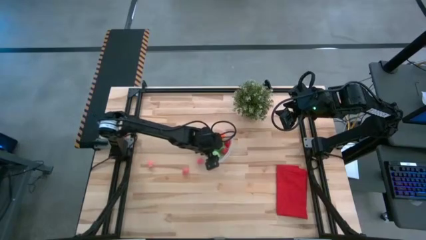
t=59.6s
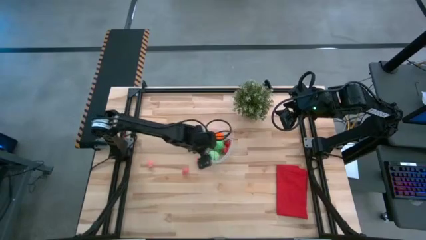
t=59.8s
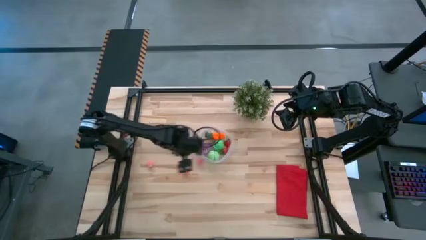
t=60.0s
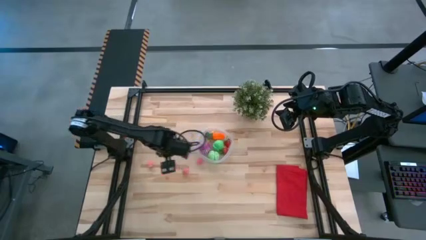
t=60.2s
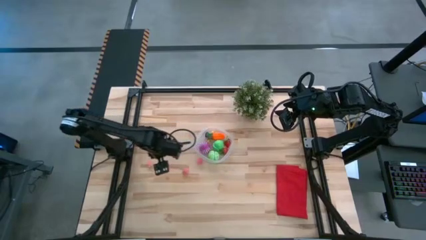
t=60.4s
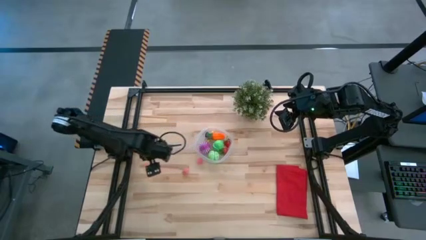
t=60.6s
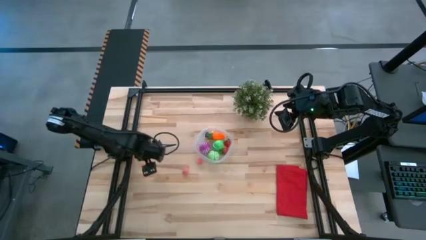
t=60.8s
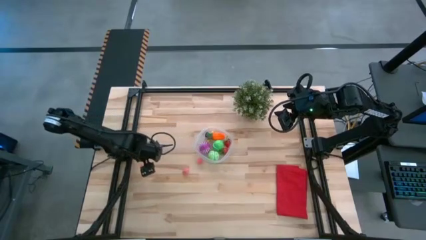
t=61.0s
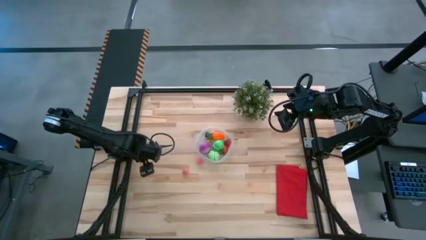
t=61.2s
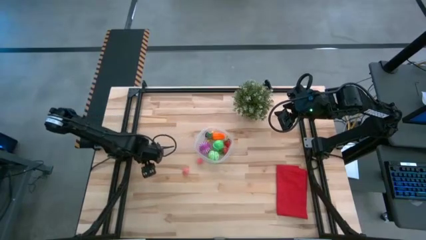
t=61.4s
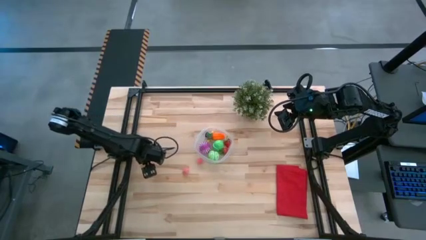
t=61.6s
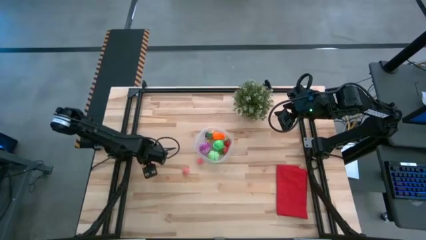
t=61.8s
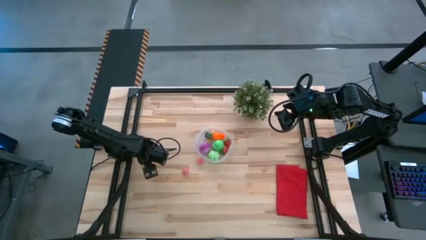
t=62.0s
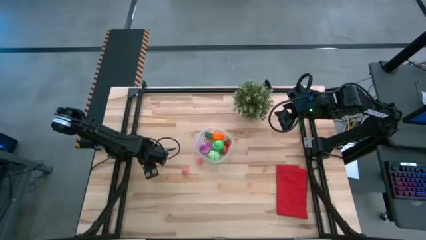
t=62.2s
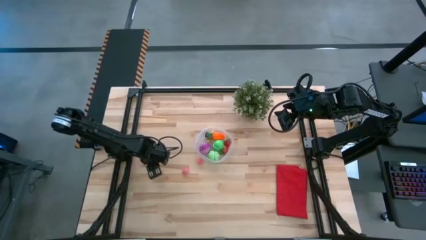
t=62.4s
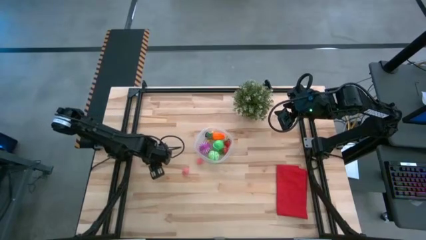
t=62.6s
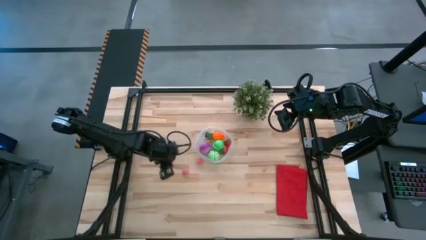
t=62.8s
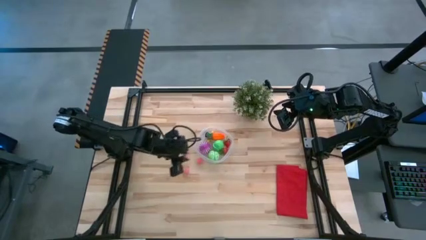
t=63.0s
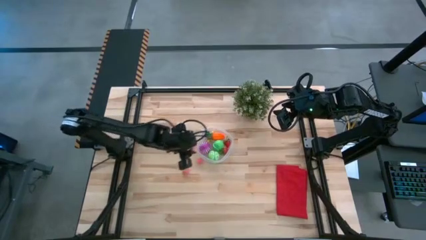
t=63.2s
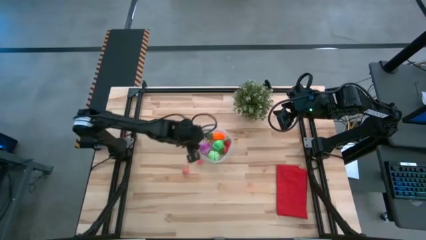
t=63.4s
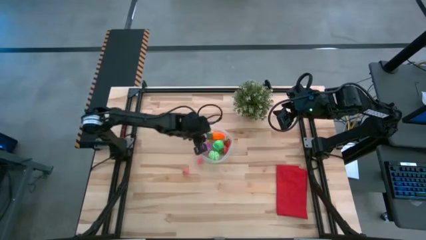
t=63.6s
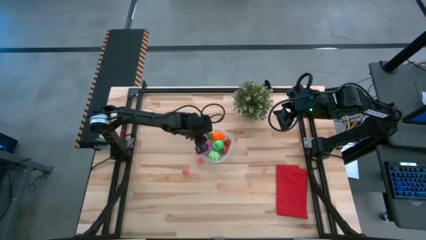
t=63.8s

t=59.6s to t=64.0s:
Task: Pick and placing Produce into tupperware
Put the left pink peach into the transparent bin

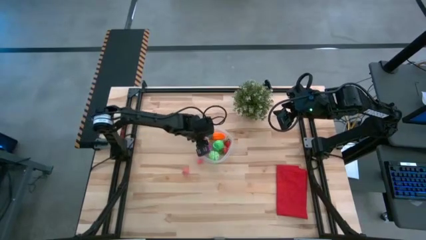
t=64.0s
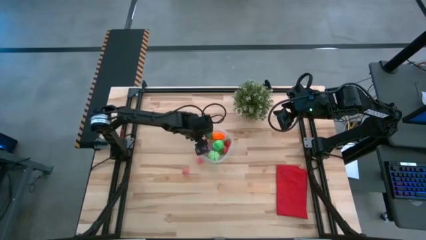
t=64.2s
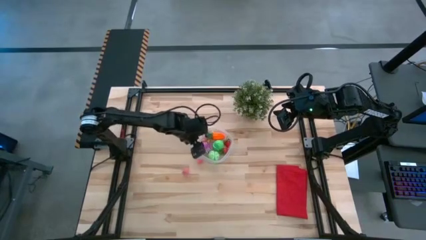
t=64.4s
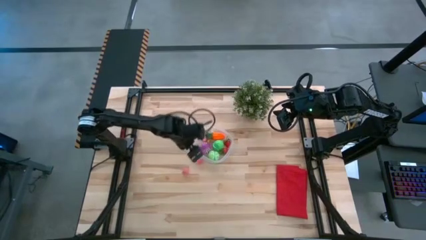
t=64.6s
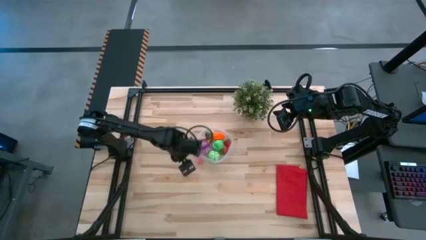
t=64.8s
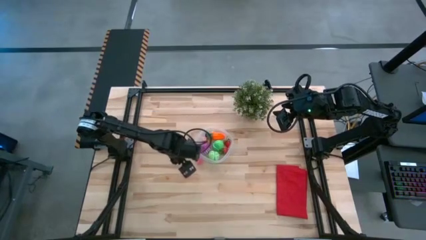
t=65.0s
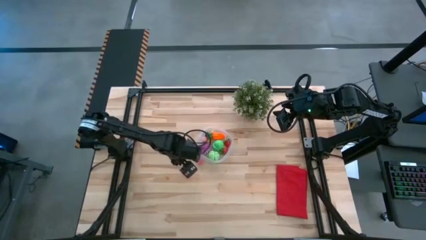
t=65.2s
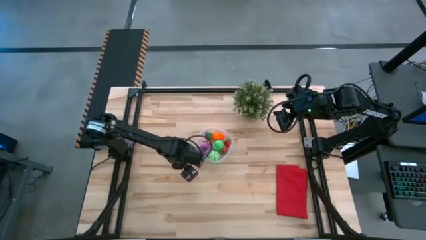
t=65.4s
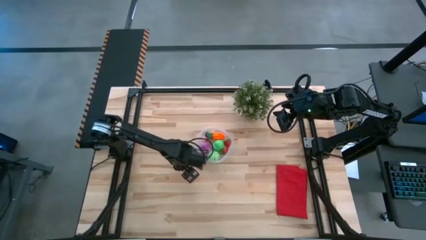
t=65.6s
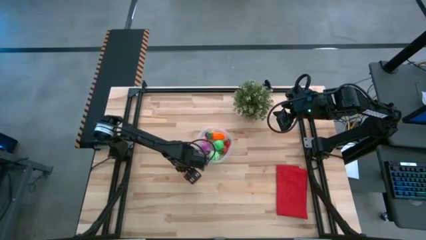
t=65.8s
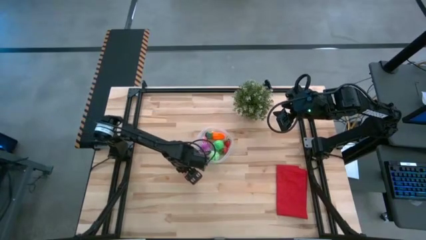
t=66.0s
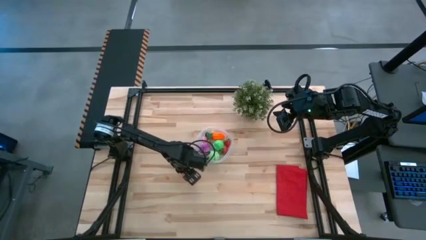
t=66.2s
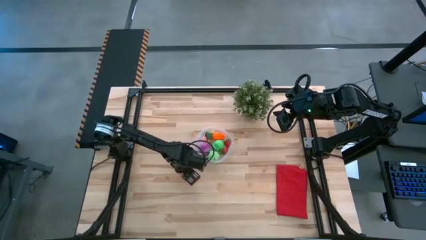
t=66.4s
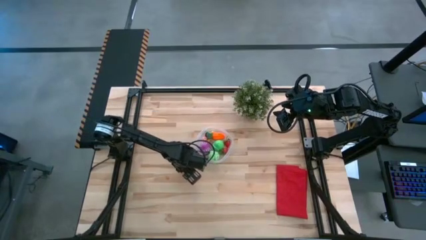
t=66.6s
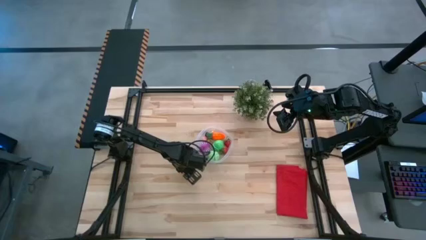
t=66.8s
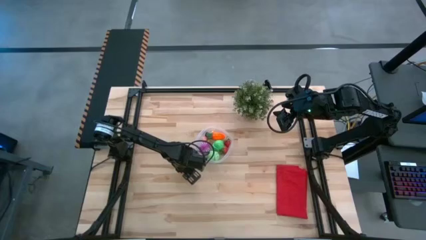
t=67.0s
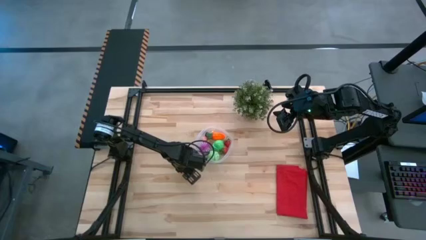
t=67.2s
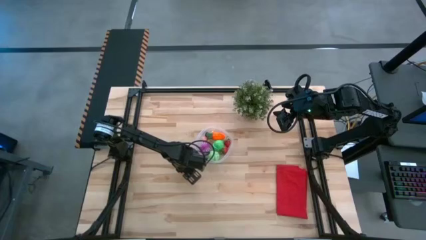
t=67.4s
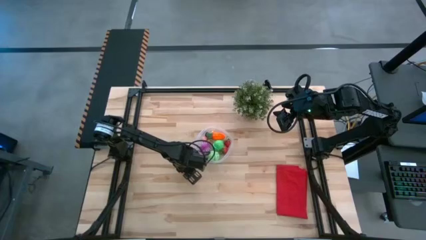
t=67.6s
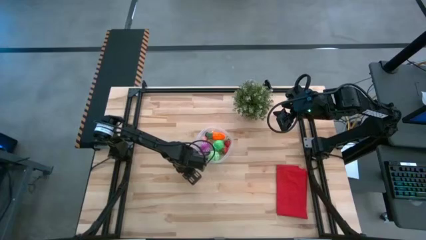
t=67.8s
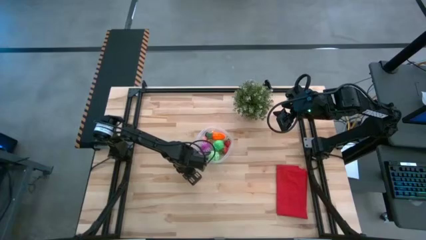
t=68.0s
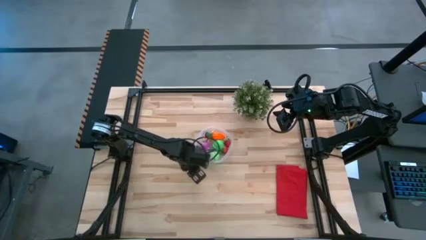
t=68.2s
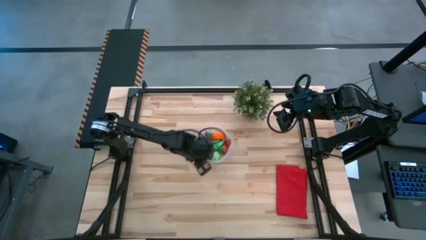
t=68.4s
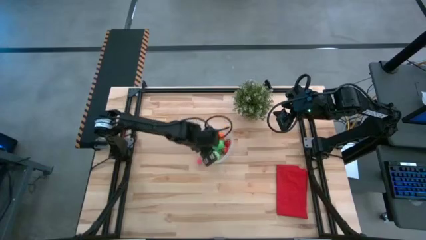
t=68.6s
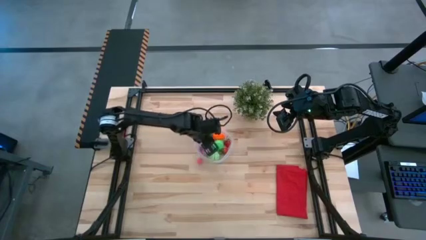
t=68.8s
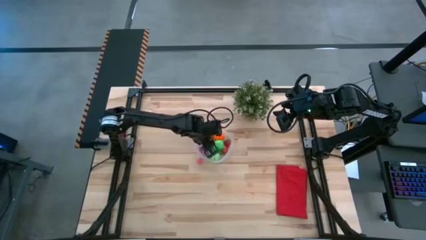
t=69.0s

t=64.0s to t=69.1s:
Put the left pink peach into the transparent bin

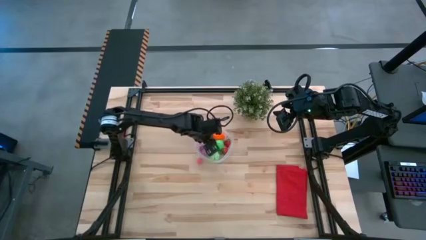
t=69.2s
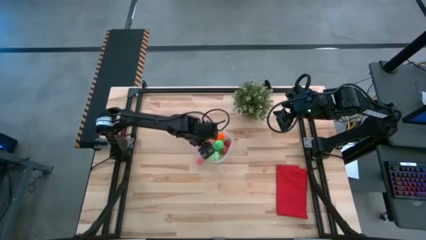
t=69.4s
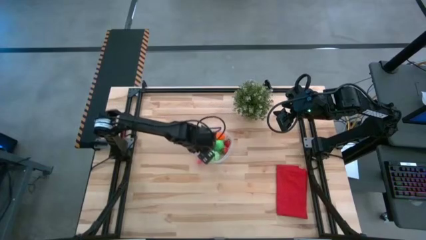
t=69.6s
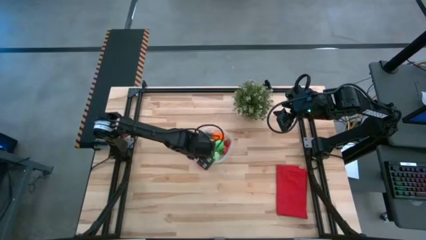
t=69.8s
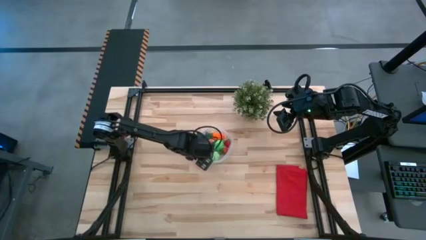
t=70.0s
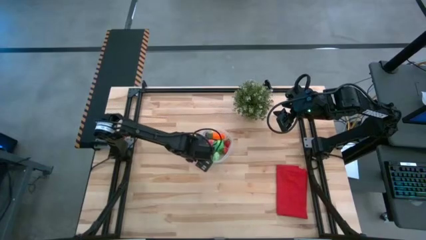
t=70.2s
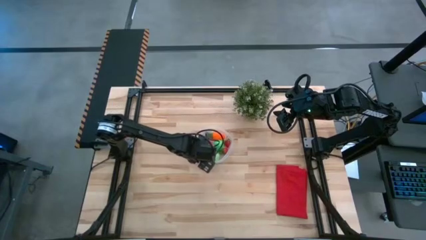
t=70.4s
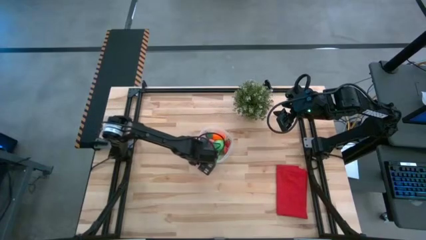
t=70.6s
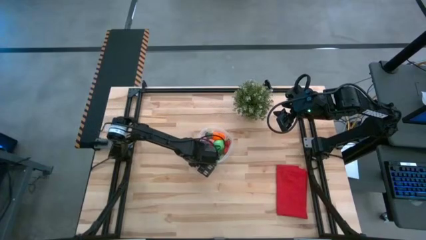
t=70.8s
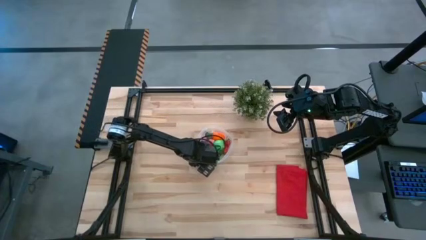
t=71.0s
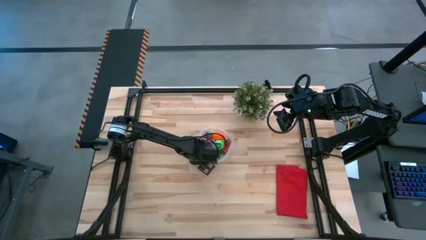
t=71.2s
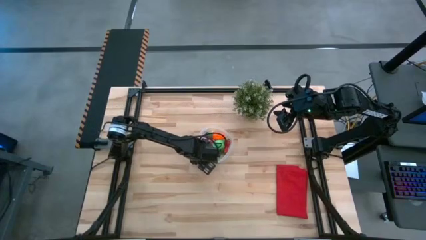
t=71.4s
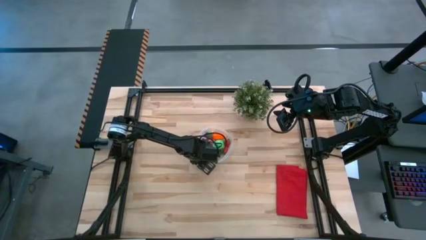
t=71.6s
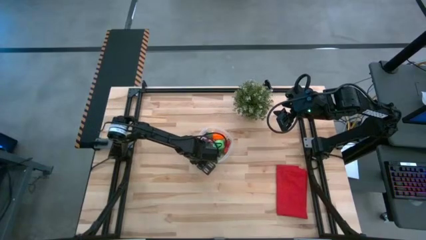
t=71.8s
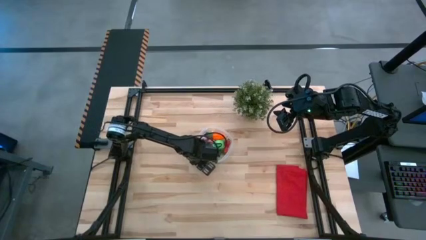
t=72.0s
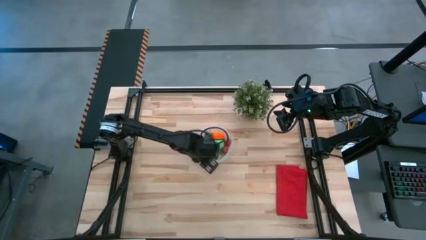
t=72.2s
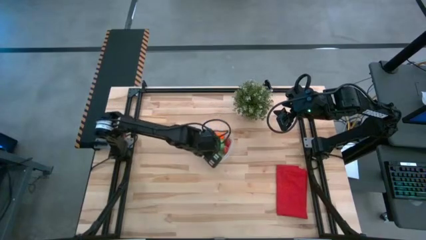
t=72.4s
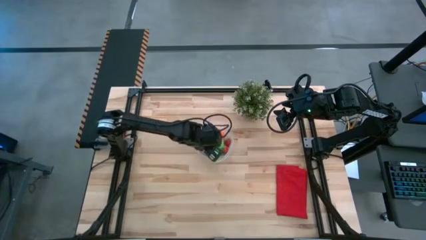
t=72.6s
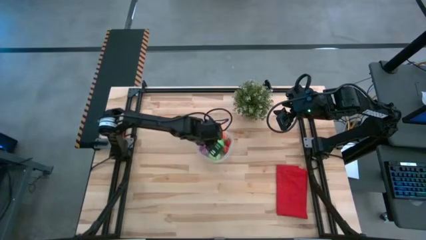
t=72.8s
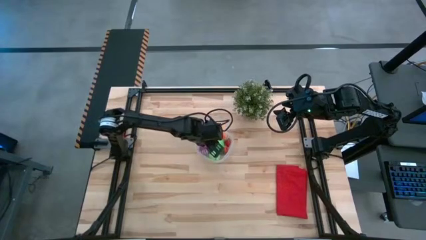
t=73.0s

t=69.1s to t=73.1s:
Put the pink peach into the transparent bin
